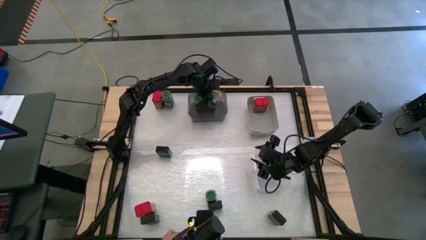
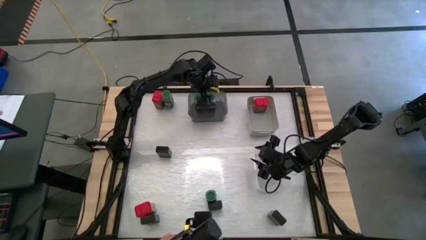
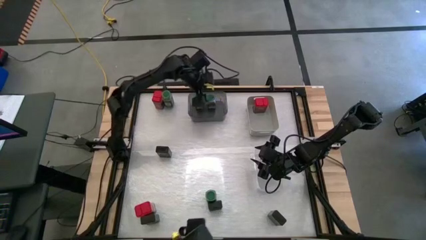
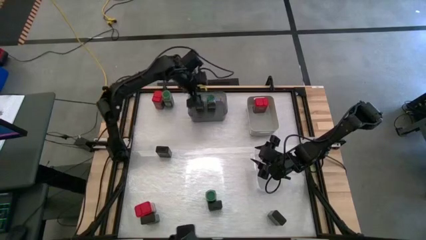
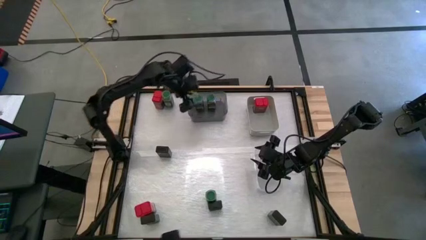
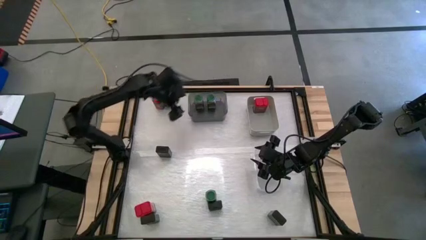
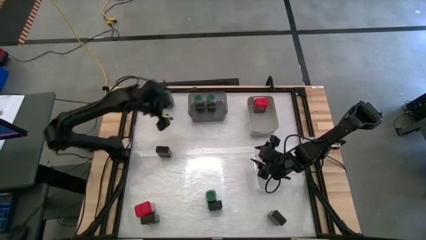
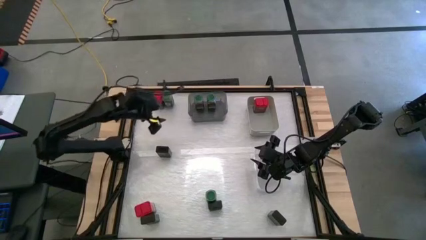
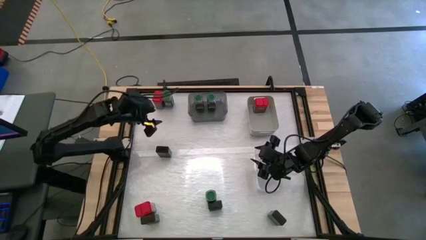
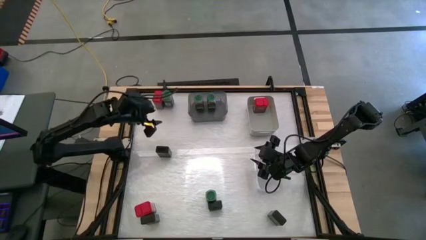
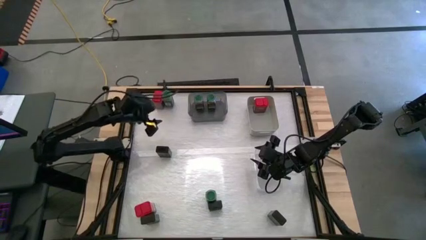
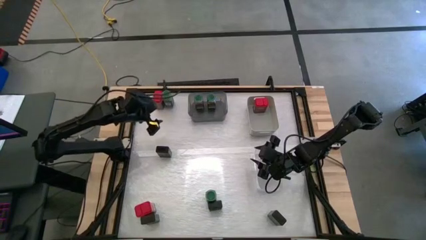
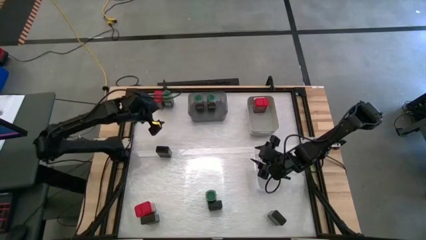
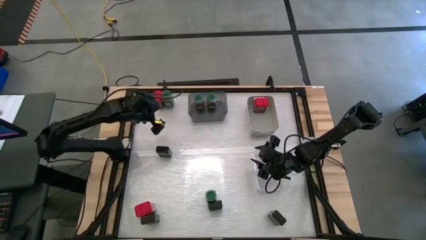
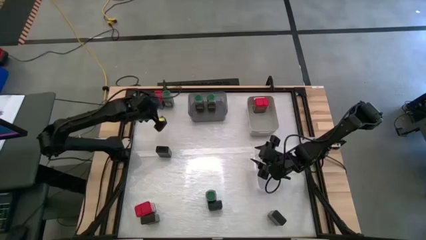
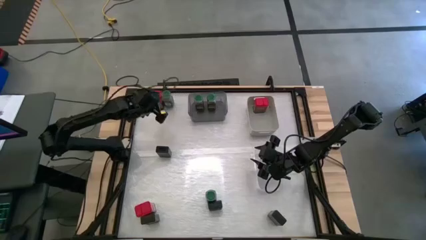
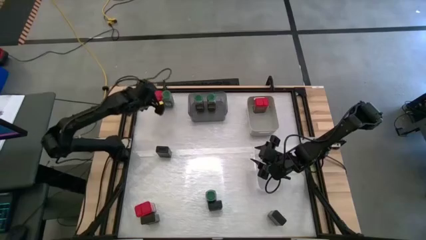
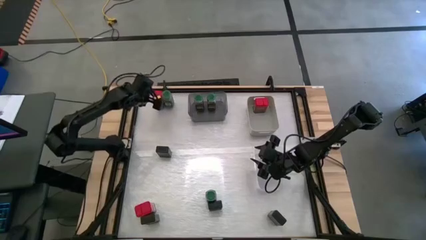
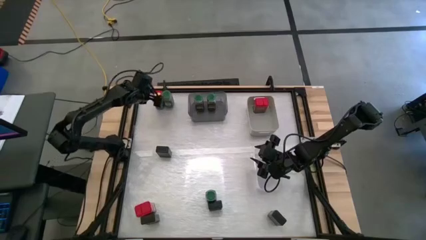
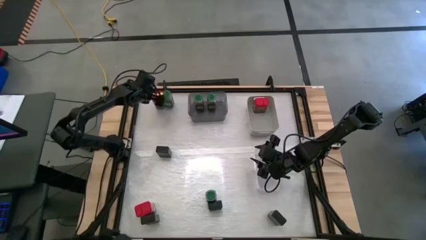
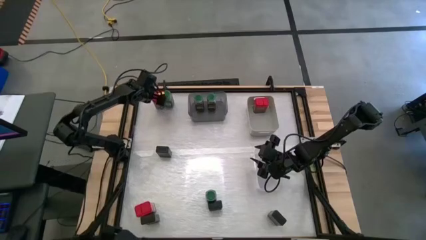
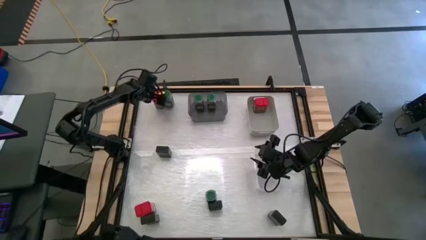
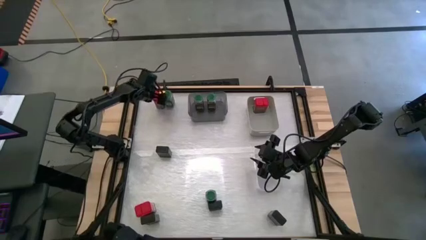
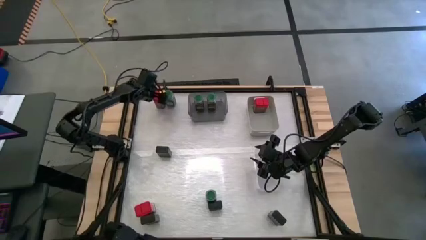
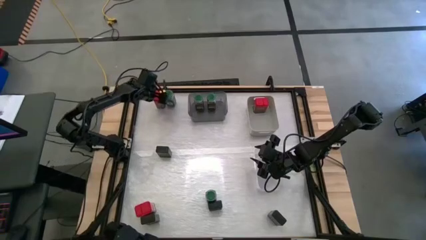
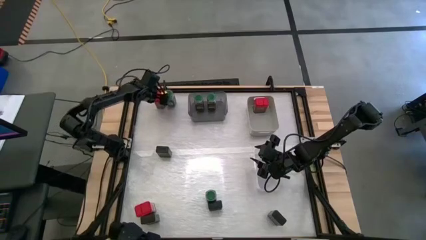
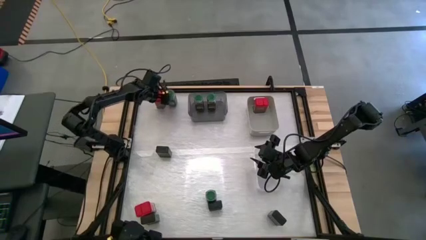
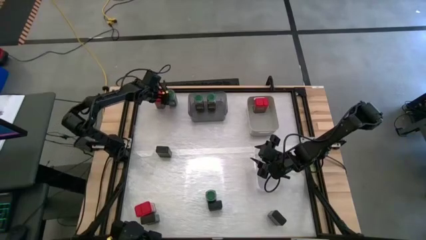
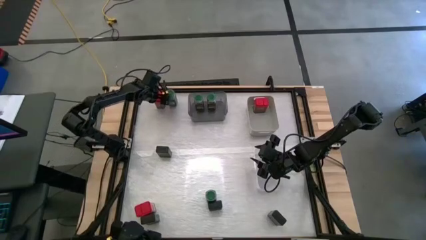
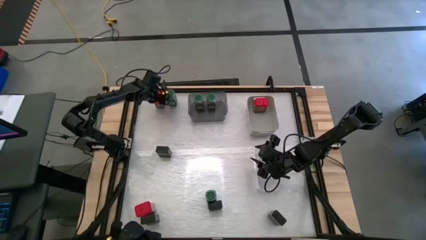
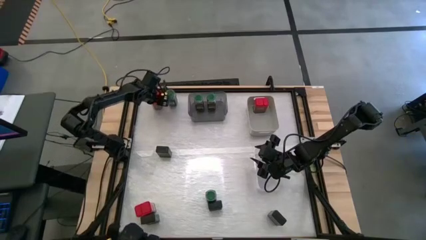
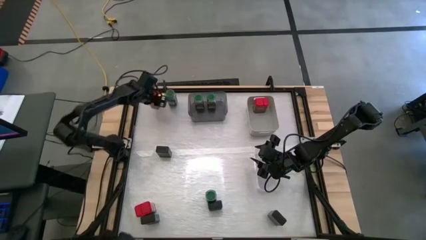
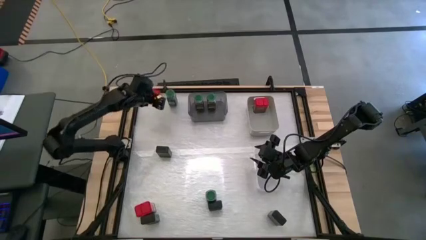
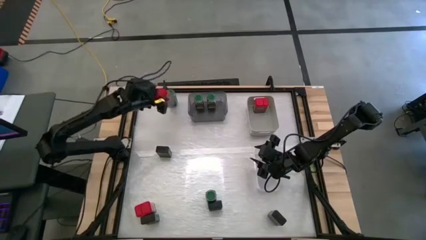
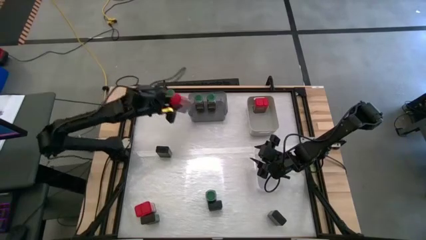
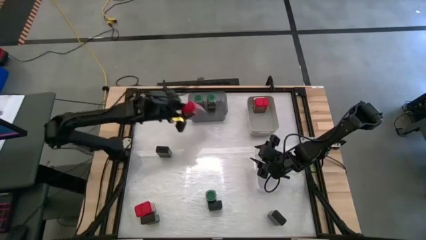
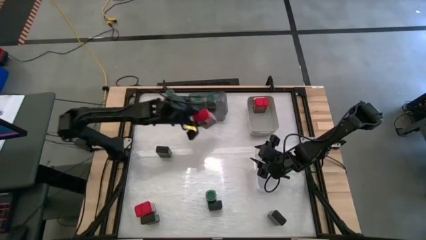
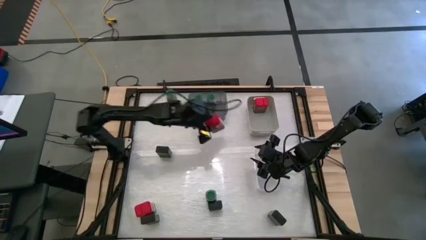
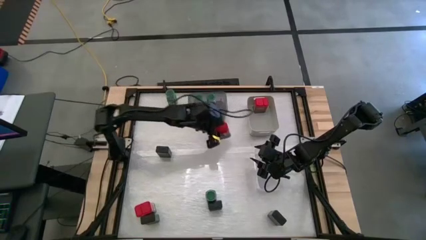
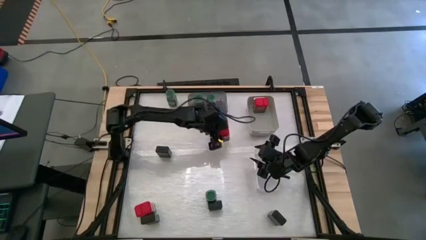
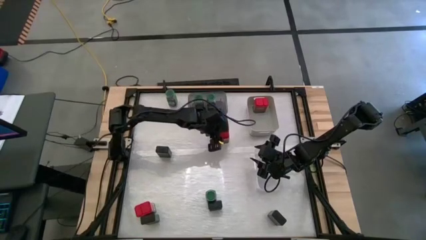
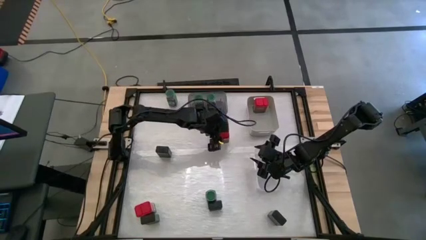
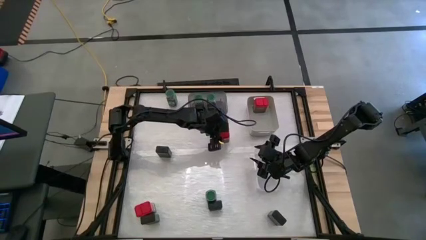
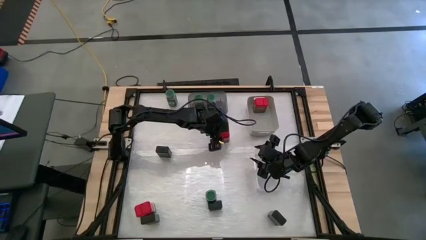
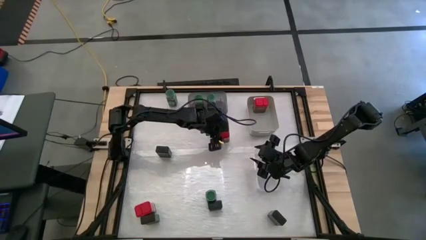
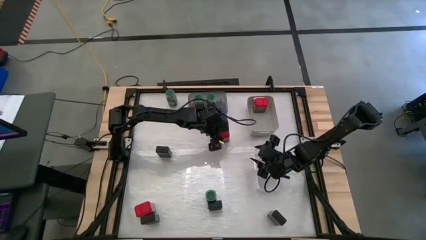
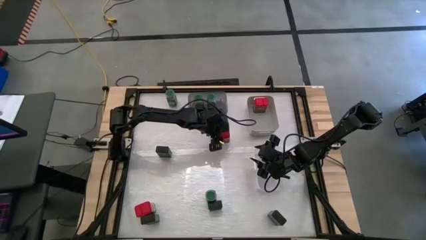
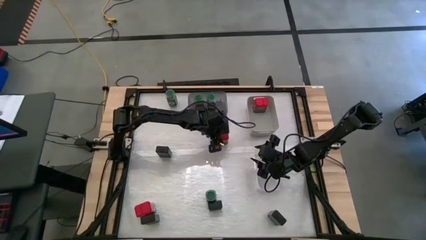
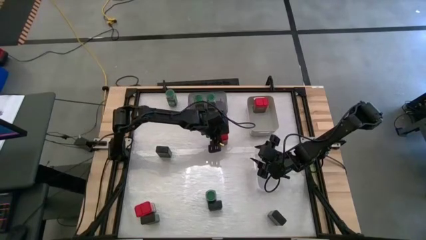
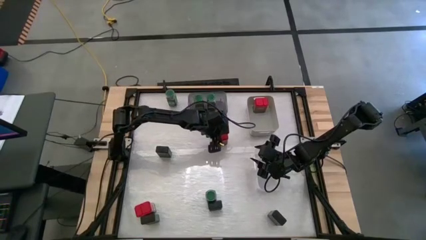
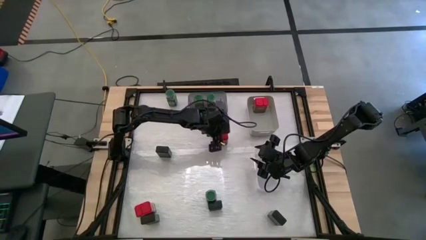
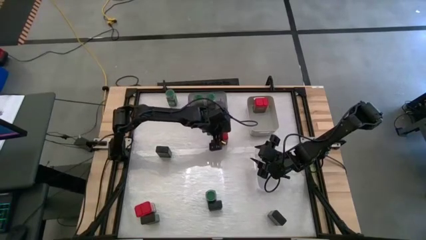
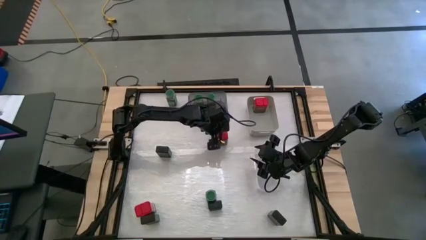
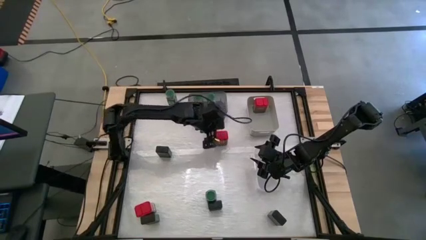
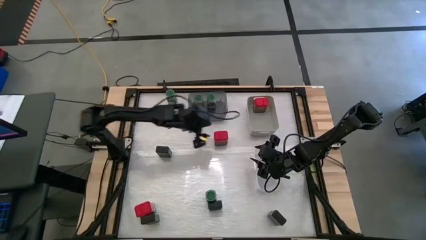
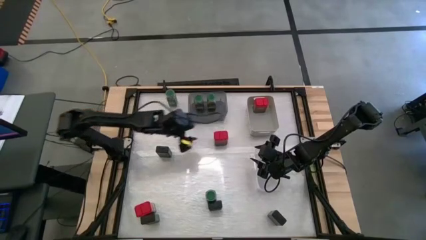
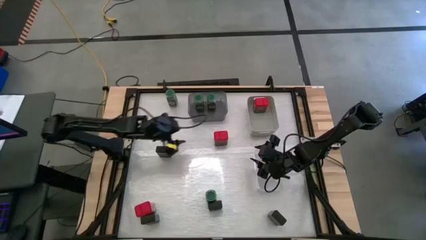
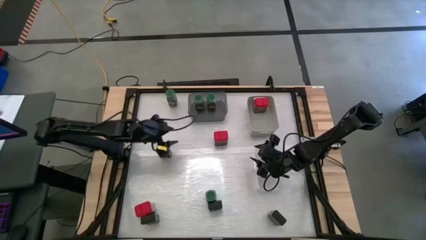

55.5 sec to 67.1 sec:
Task: Sort spices by type
Move the top left red seasoning can to the center of the table
